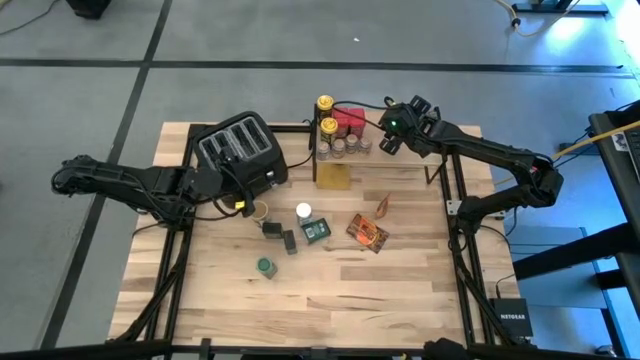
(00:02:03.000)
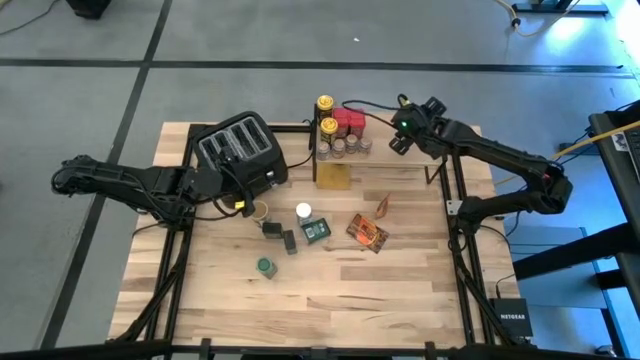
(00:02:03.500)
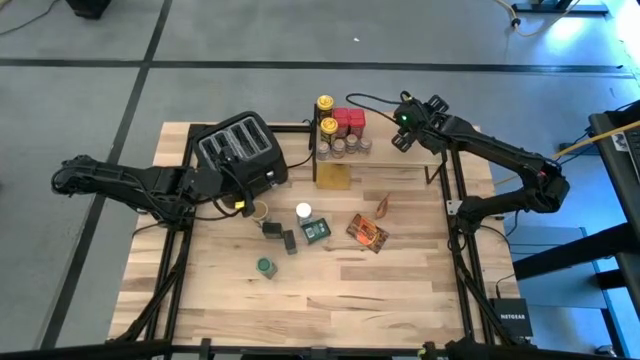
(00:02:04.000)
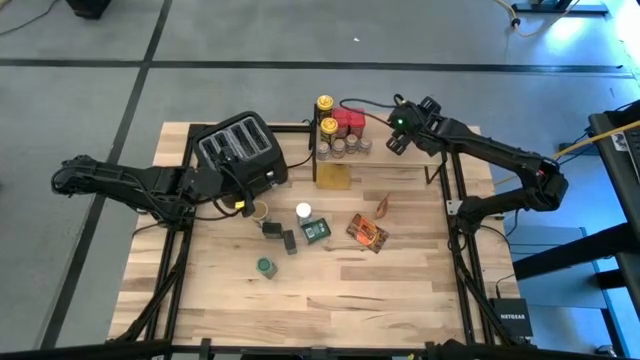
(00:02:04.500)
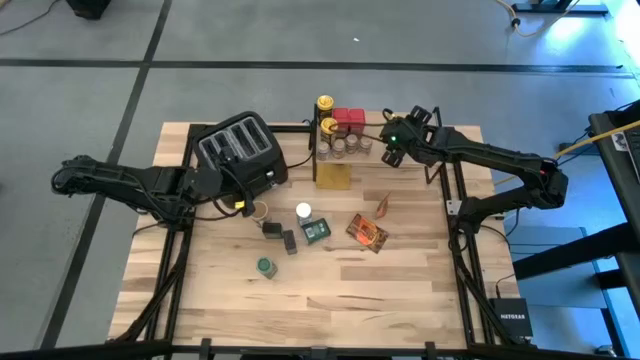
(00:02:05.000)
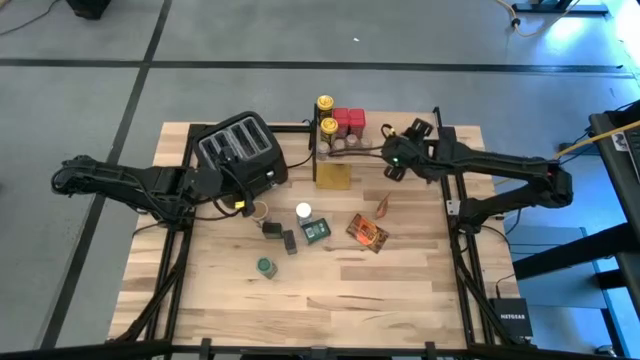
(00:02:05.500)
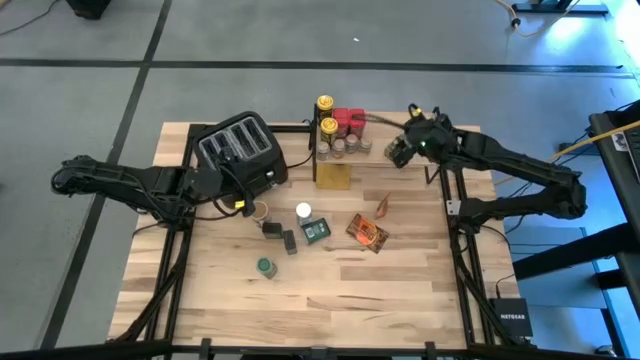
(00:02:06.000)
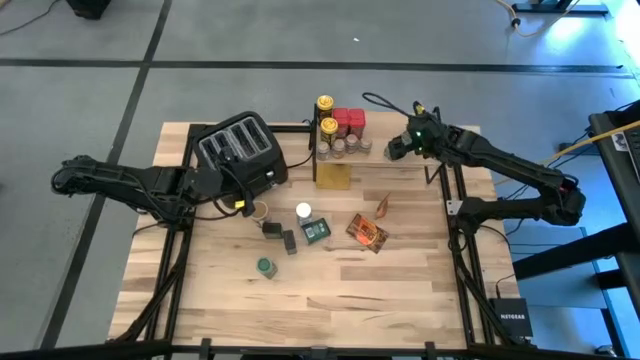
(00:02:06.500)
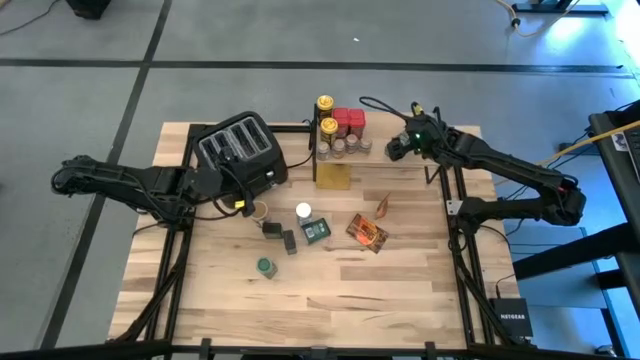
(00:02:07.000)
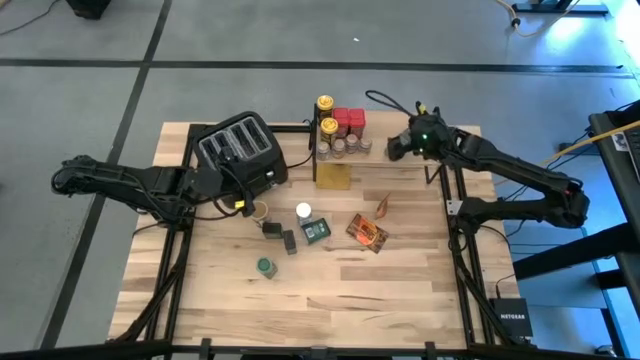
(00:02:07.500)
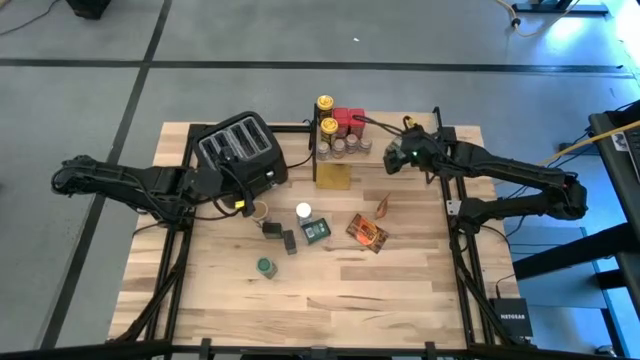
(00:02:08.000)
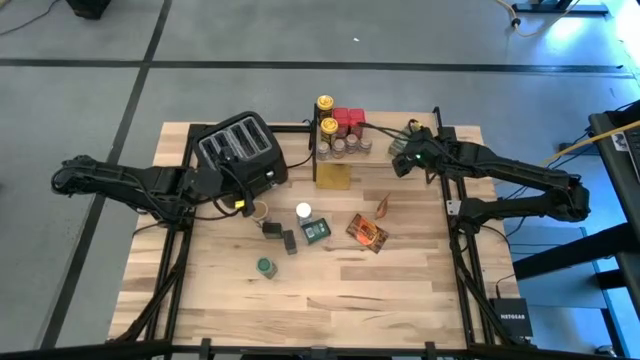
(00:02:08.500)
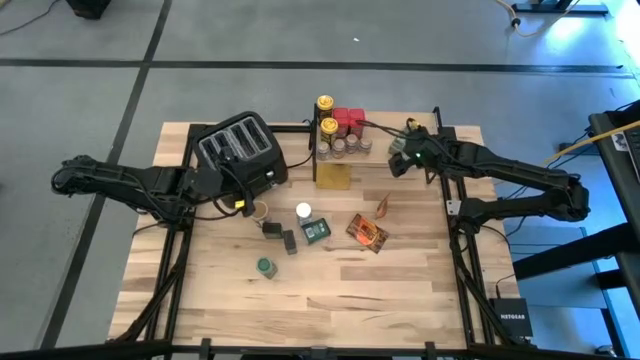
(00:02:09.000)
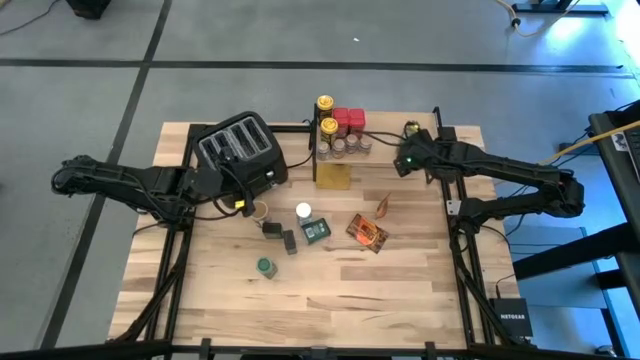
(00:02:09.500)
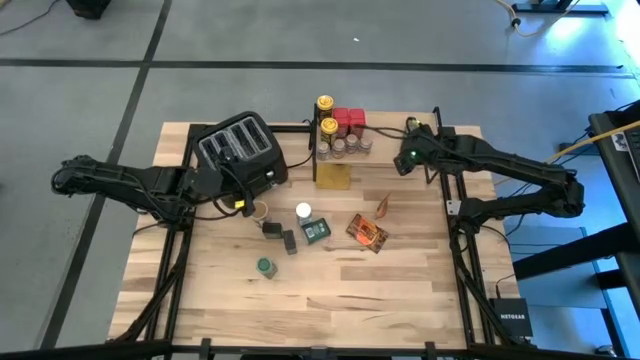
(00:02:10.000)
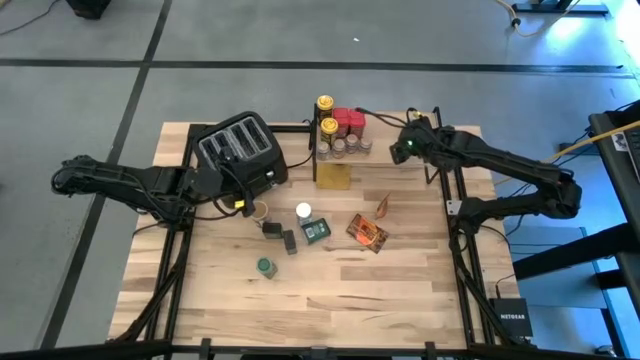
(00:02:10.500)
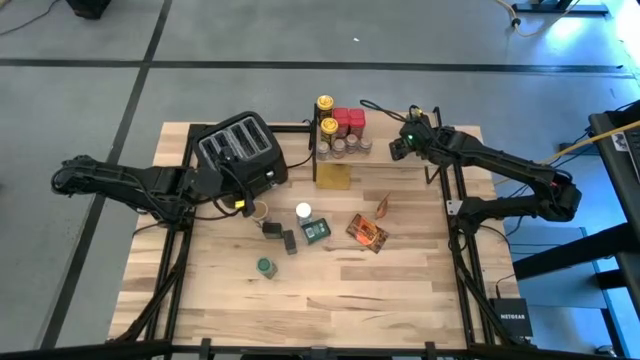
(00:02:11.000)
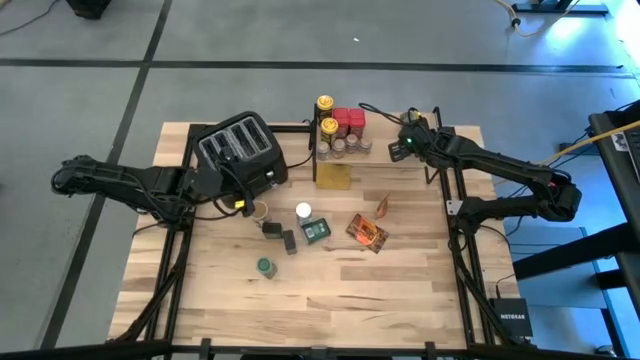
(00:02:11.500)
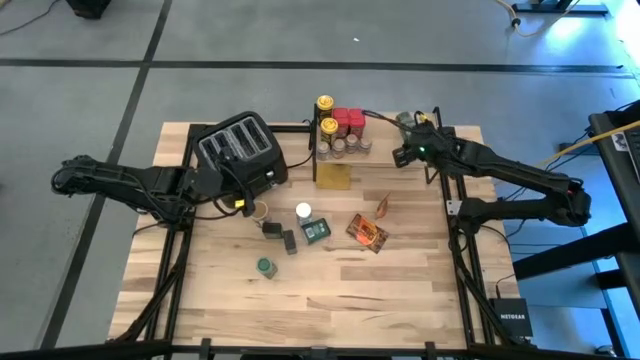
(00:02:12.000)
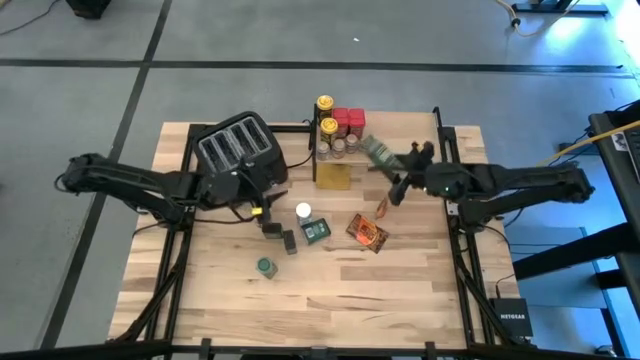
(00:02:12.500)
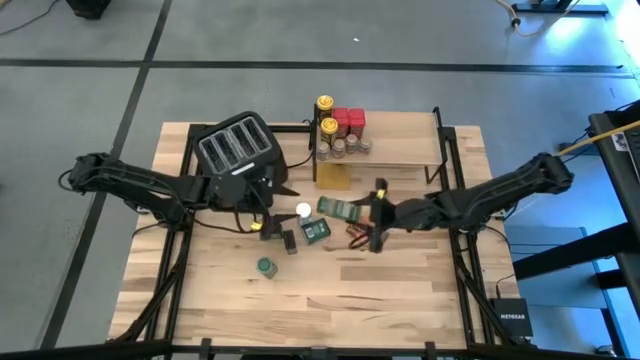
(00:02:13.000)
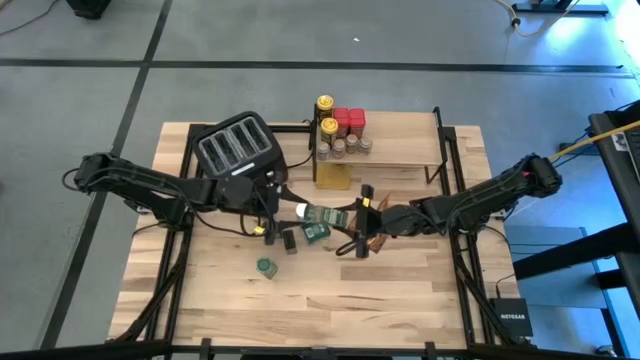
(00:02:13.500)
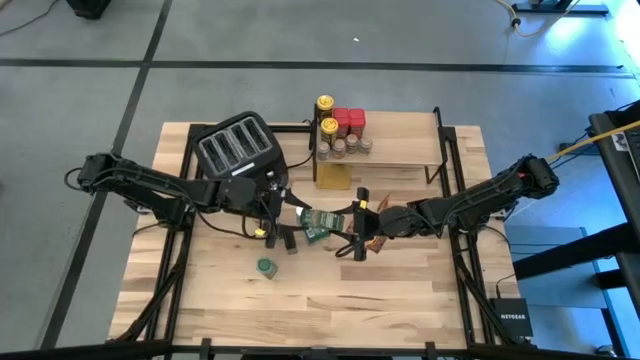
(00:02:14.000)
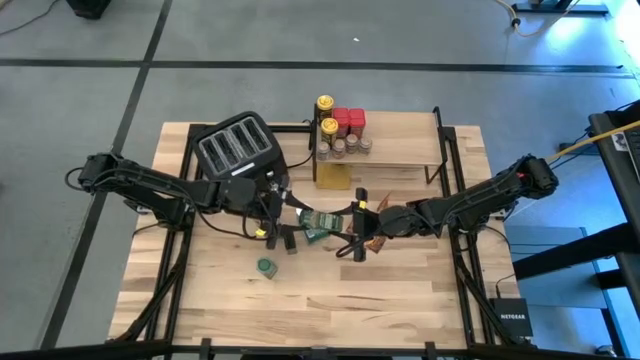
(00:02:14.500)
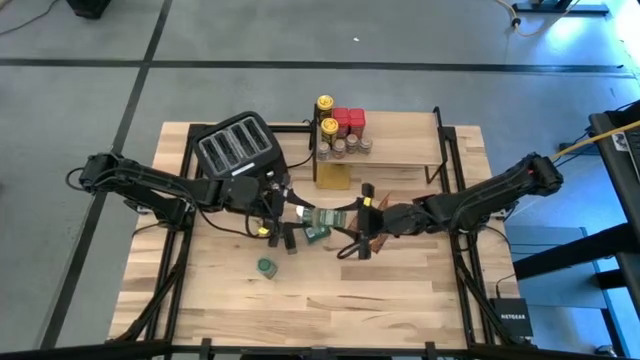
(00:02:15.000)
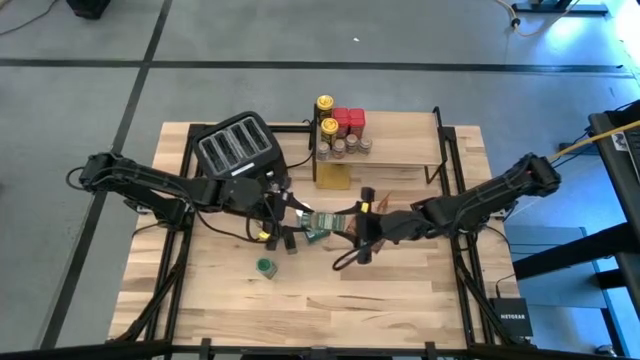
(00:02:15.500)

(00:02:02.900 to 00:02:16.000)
Task: Shelf spices
Put the green seasoning bottle on the shelf

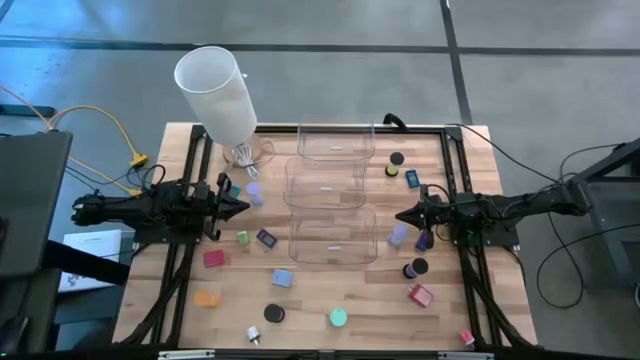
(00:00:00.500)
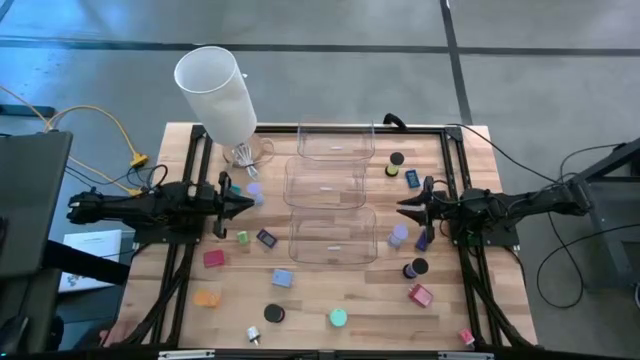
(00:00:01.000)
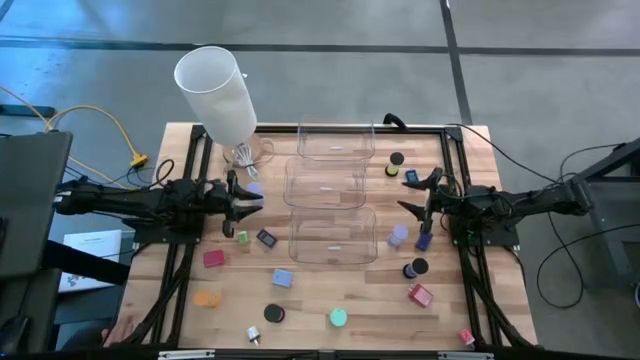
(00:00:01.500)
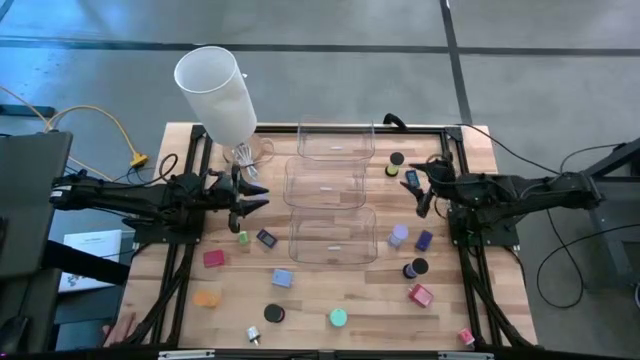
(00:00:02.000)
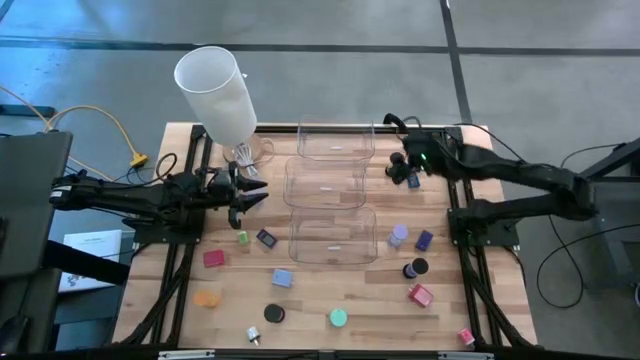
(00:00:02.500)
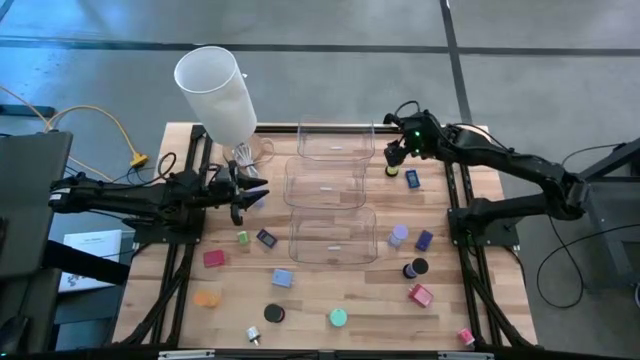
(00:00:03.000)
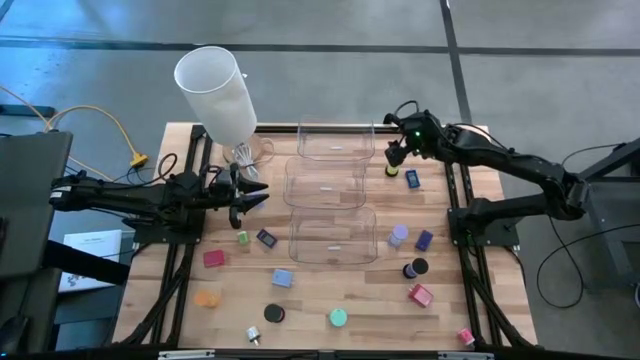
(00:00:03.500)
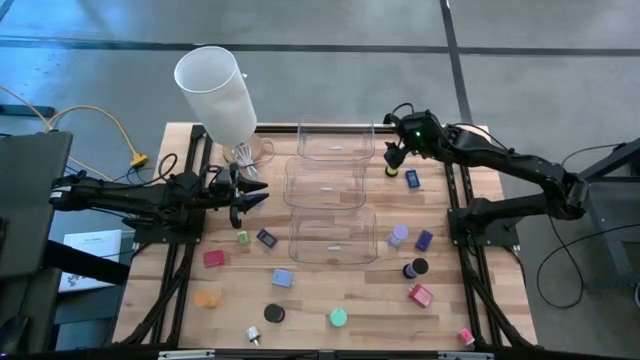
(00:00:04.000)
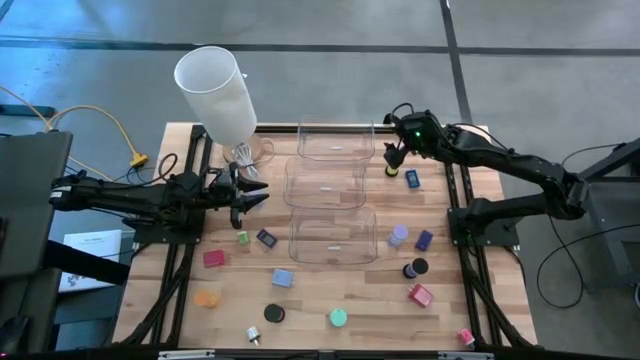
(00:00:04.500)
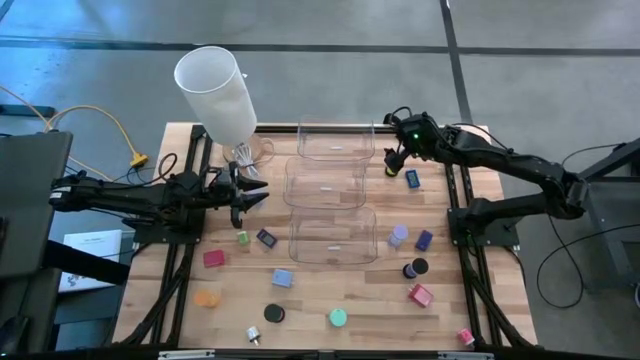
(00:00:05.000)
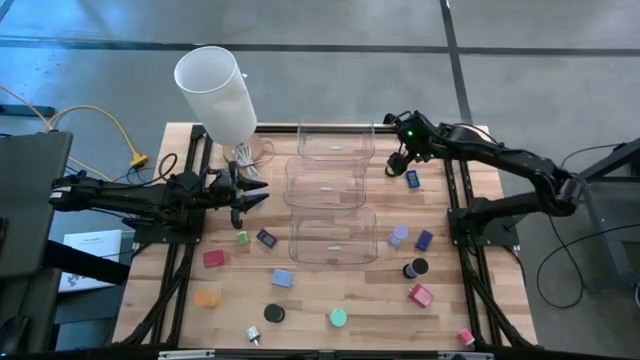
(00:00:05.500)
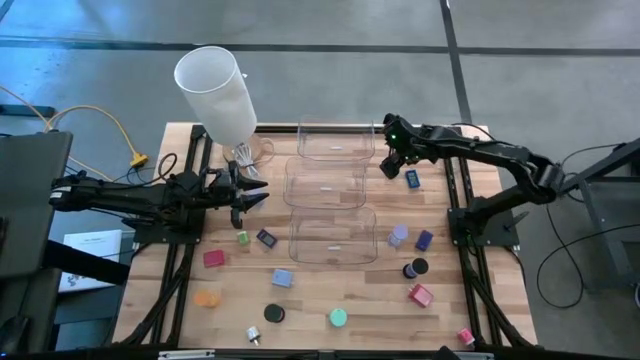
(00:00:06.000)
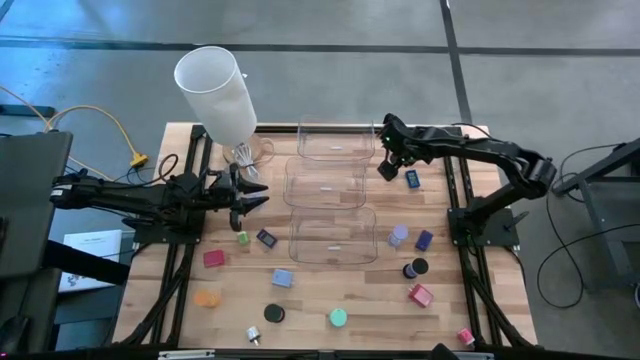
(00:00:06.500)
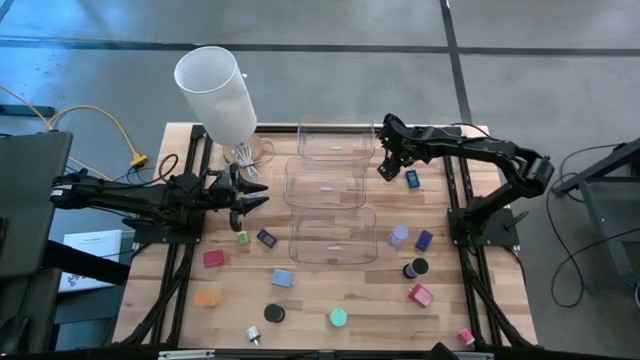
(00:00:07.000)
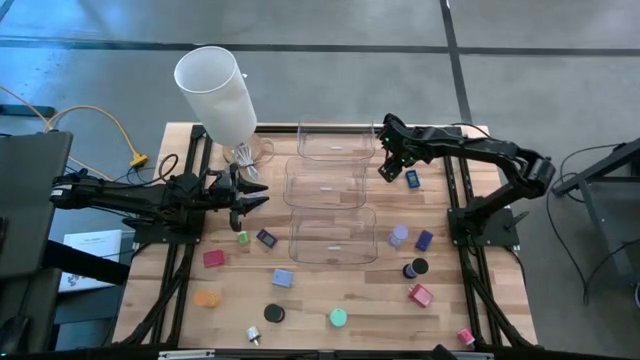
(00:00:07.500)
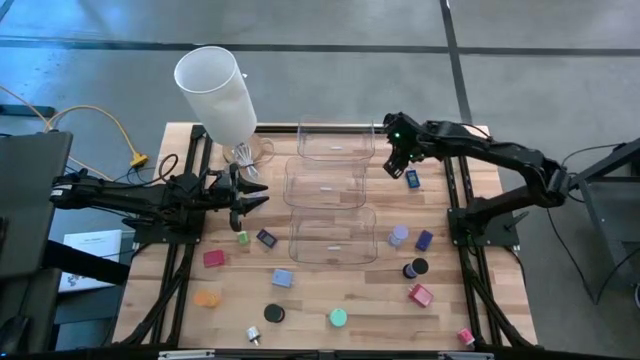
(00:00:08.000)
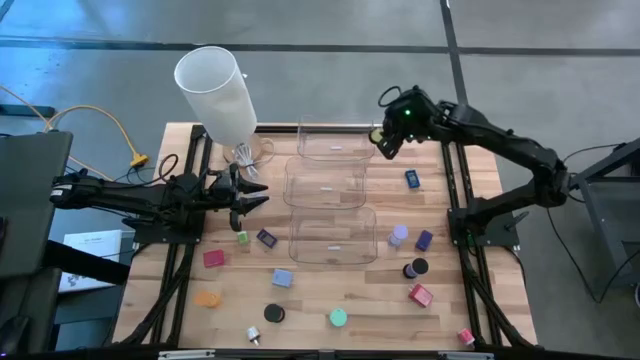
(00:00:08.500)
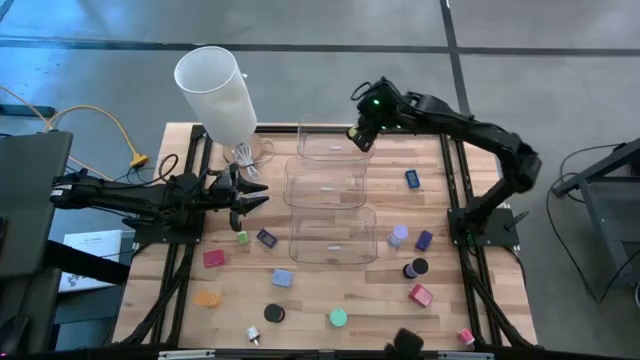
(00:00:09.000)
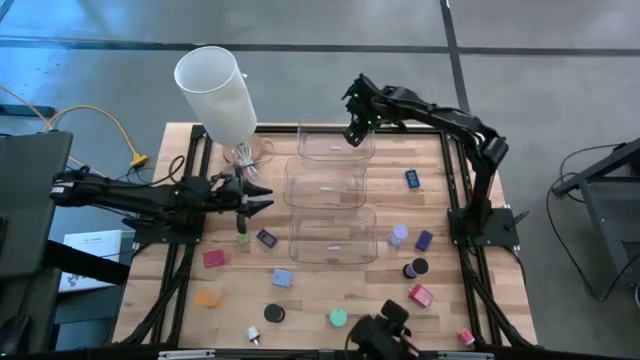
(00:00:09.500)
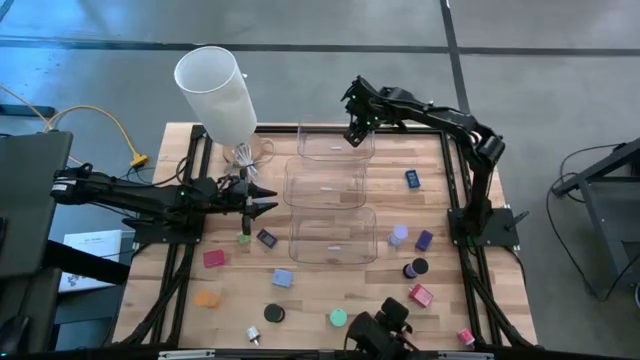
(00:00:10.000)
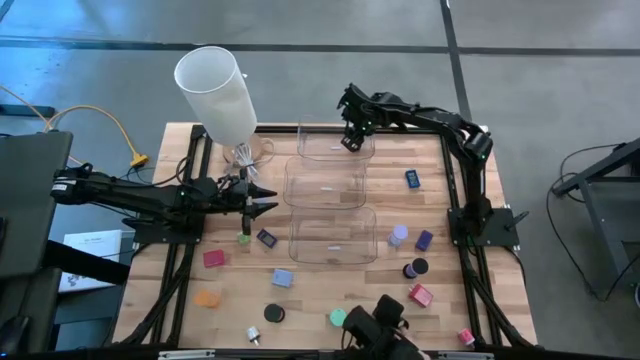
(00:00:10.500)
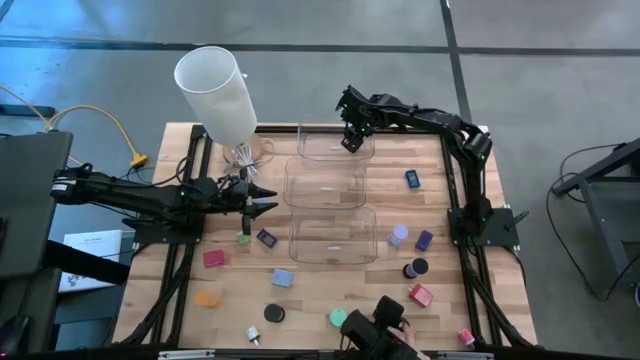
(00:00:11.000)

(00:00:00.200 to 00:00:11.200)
Task: Pick & Place Office items
Put the black yellow hourglass into the top transparent bin
